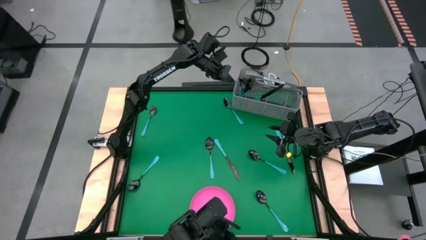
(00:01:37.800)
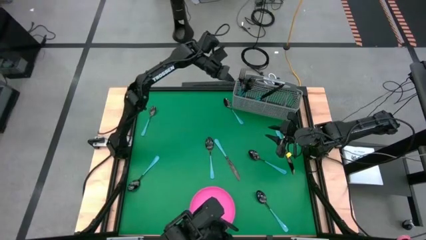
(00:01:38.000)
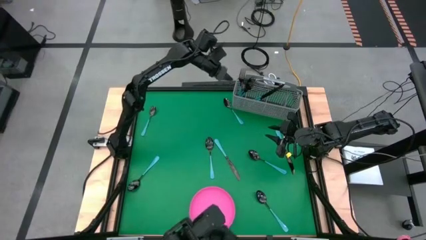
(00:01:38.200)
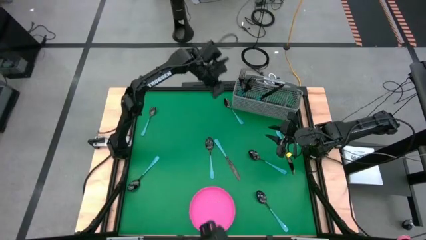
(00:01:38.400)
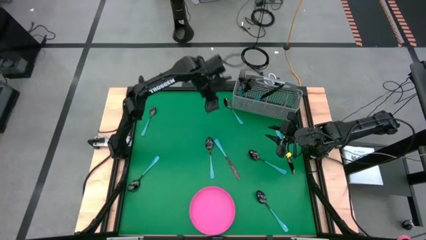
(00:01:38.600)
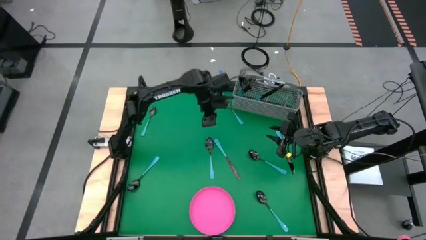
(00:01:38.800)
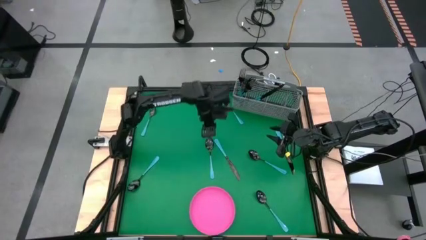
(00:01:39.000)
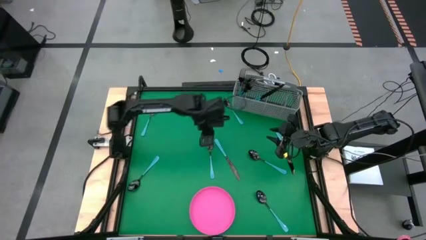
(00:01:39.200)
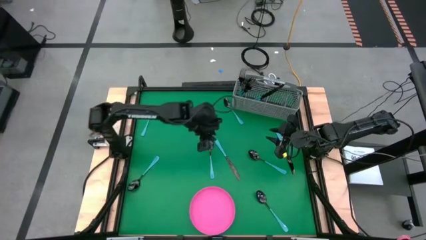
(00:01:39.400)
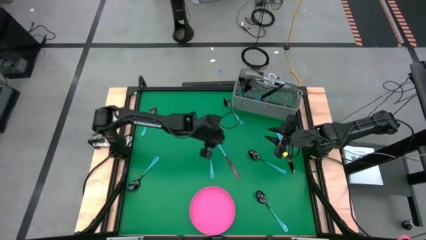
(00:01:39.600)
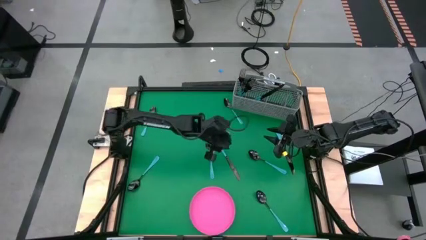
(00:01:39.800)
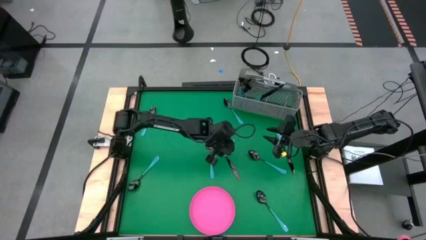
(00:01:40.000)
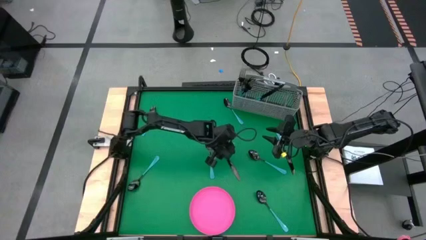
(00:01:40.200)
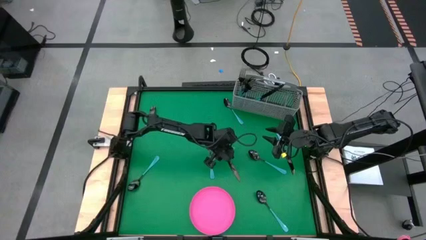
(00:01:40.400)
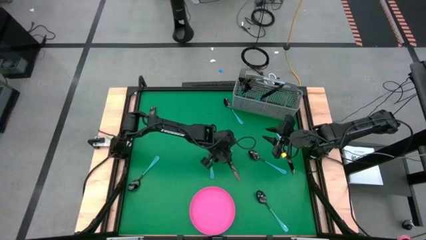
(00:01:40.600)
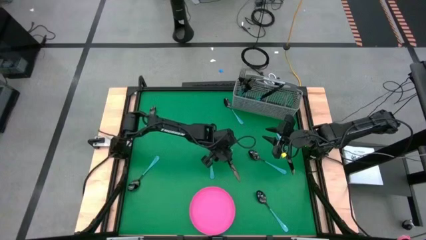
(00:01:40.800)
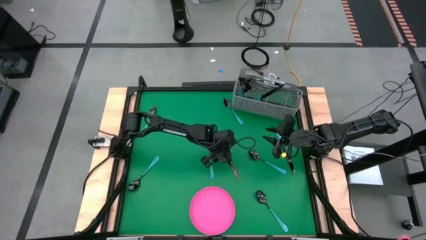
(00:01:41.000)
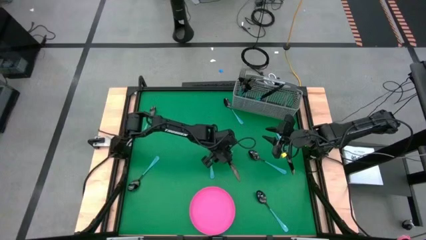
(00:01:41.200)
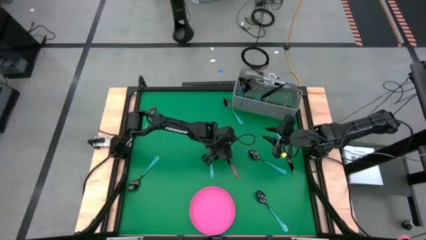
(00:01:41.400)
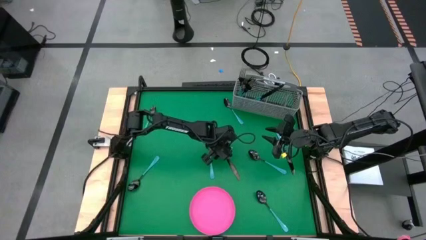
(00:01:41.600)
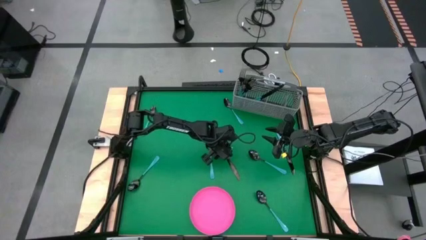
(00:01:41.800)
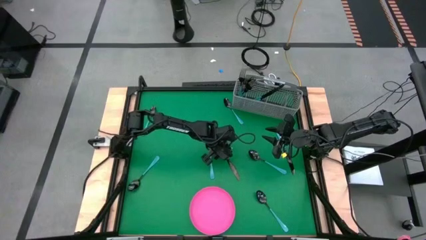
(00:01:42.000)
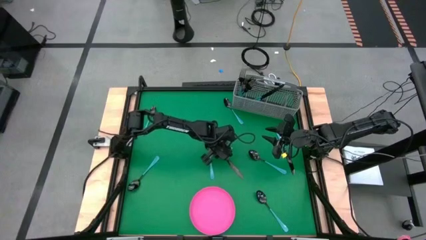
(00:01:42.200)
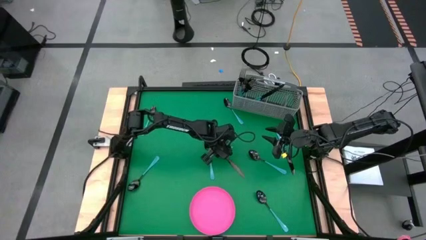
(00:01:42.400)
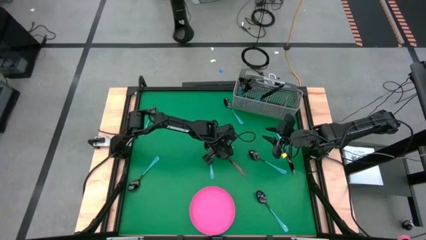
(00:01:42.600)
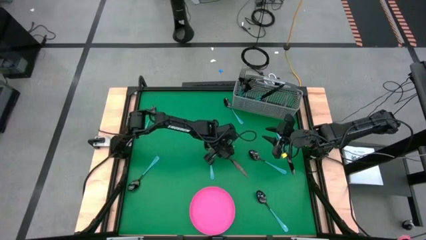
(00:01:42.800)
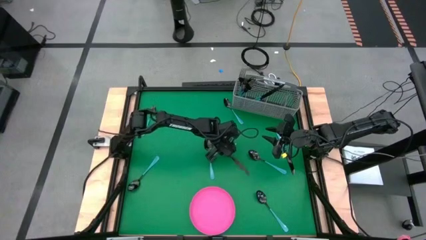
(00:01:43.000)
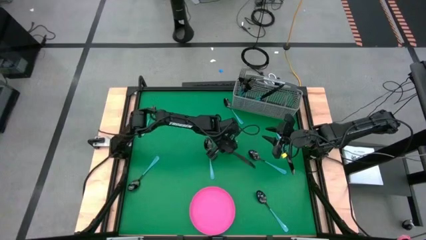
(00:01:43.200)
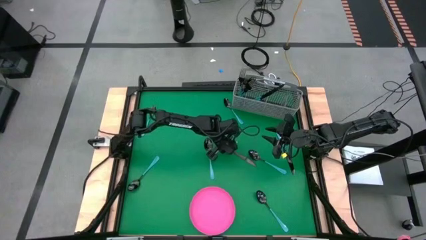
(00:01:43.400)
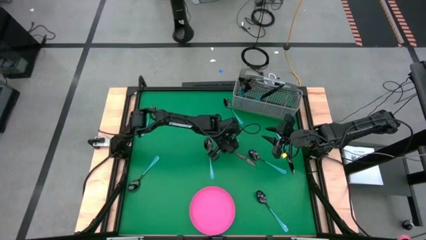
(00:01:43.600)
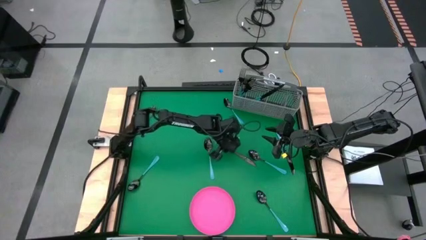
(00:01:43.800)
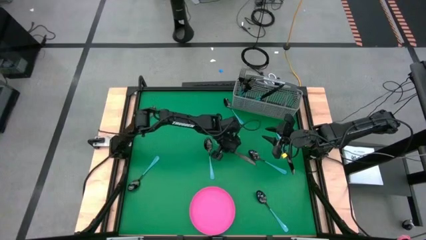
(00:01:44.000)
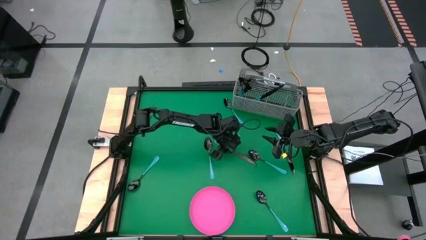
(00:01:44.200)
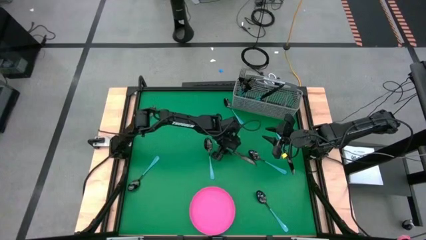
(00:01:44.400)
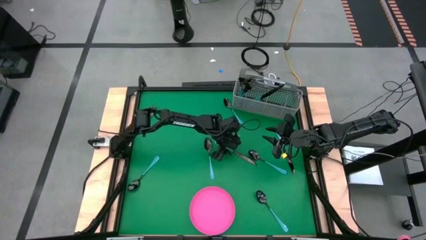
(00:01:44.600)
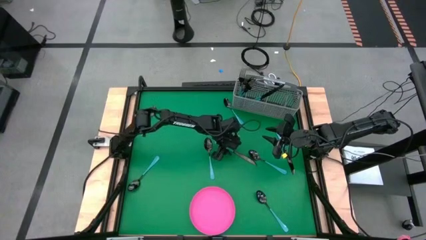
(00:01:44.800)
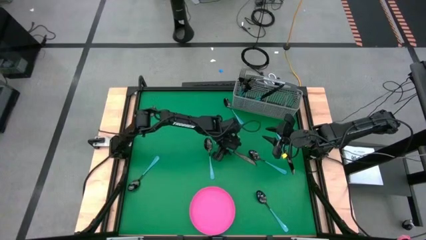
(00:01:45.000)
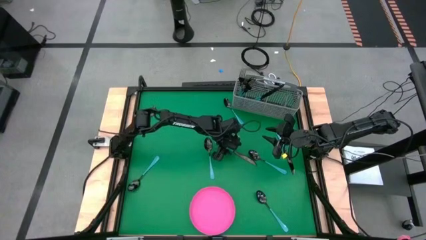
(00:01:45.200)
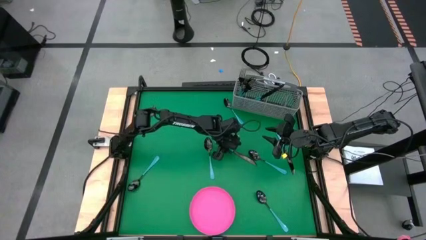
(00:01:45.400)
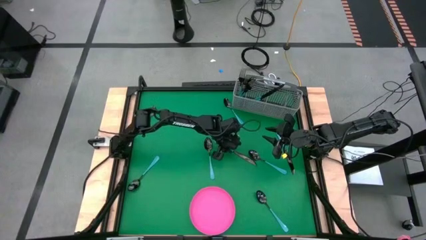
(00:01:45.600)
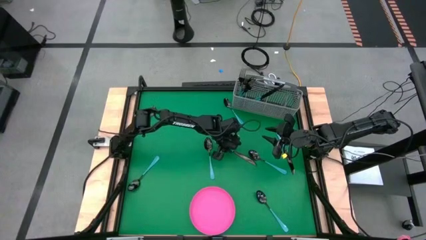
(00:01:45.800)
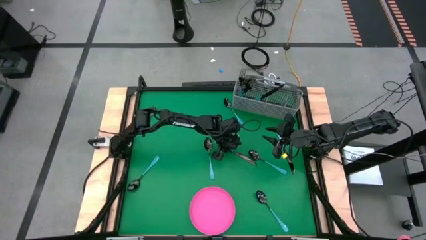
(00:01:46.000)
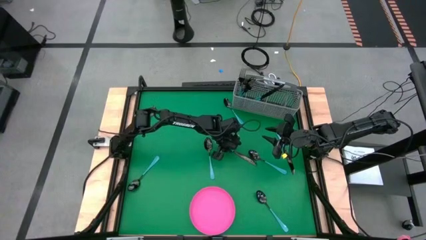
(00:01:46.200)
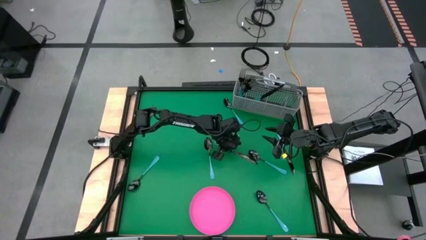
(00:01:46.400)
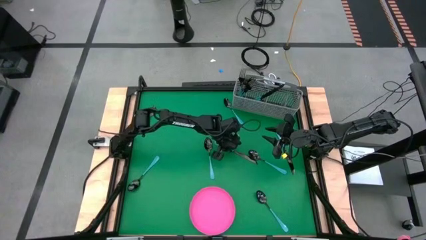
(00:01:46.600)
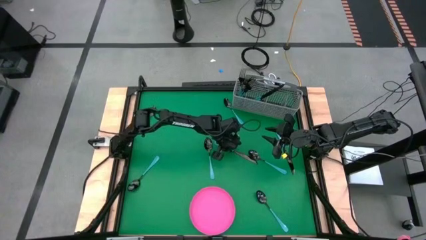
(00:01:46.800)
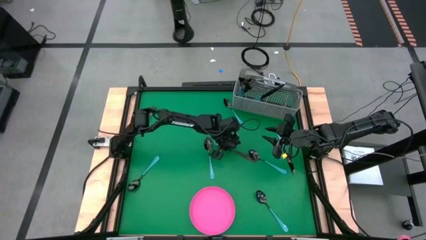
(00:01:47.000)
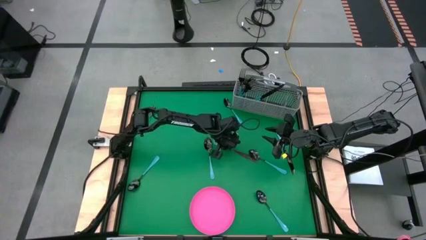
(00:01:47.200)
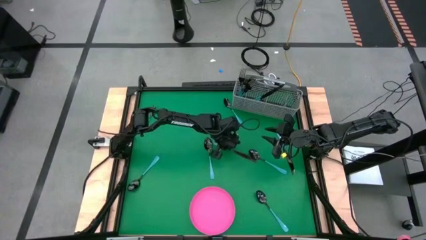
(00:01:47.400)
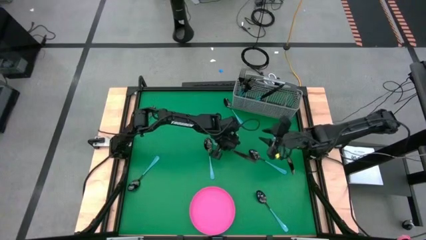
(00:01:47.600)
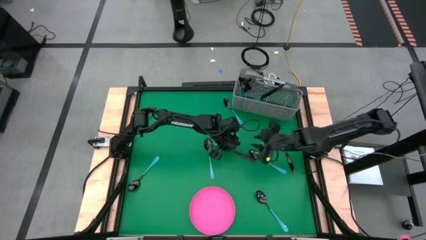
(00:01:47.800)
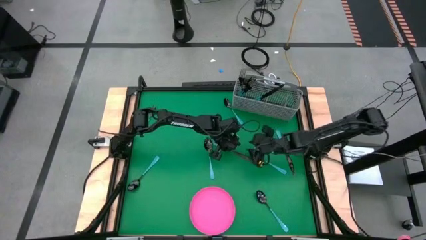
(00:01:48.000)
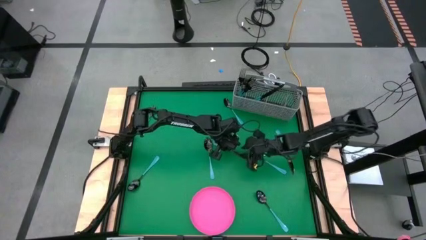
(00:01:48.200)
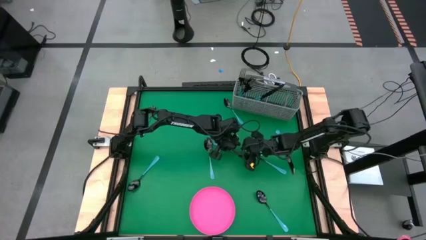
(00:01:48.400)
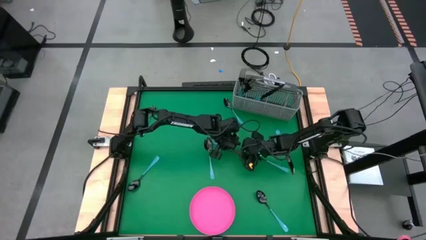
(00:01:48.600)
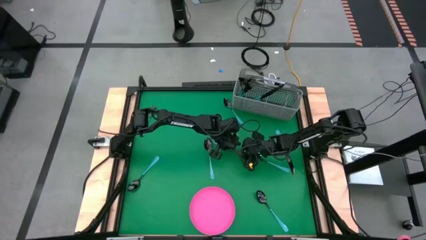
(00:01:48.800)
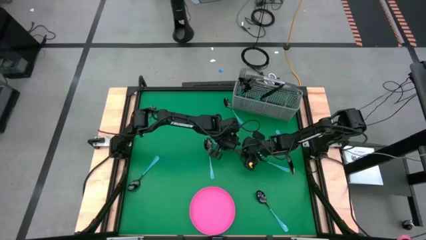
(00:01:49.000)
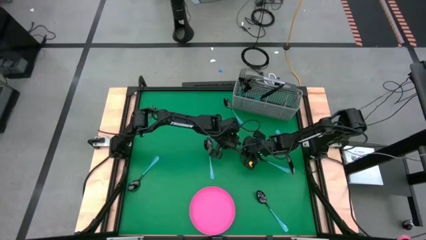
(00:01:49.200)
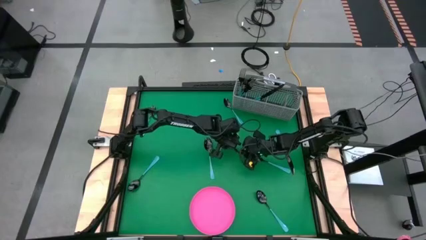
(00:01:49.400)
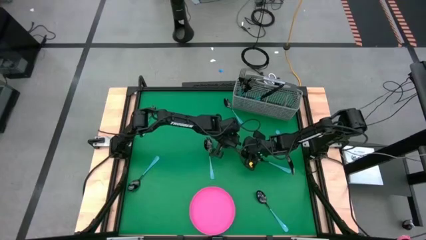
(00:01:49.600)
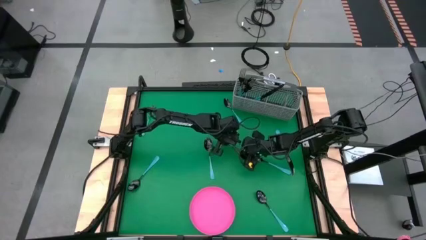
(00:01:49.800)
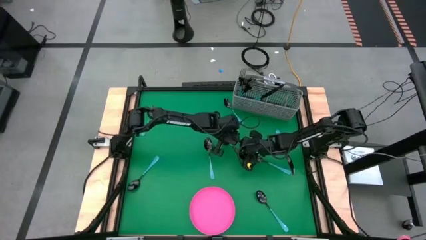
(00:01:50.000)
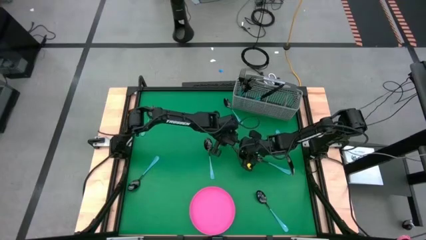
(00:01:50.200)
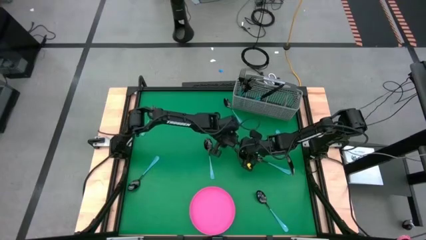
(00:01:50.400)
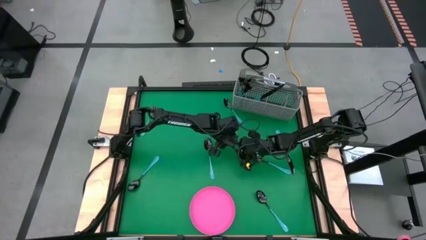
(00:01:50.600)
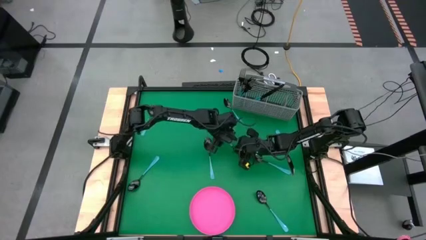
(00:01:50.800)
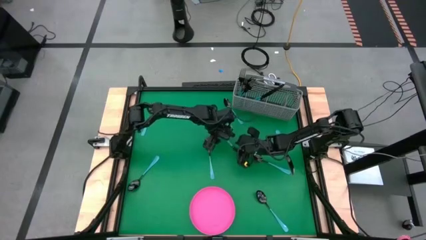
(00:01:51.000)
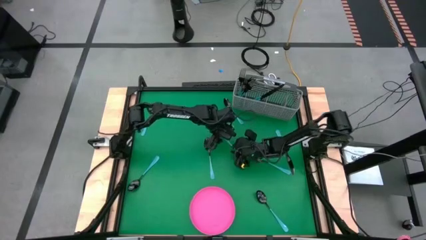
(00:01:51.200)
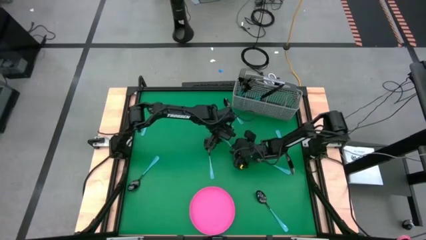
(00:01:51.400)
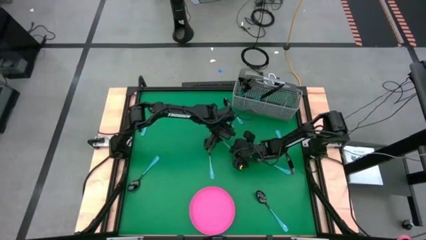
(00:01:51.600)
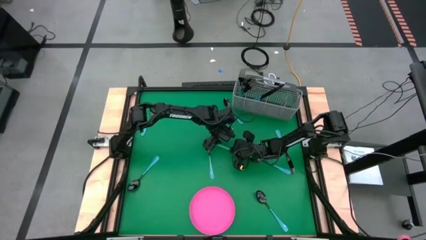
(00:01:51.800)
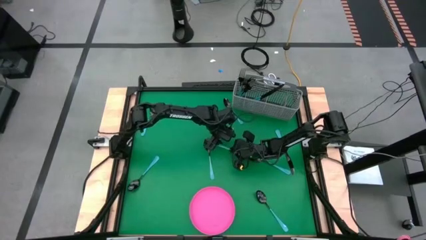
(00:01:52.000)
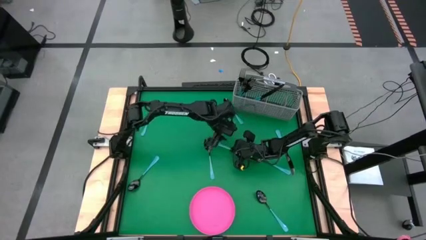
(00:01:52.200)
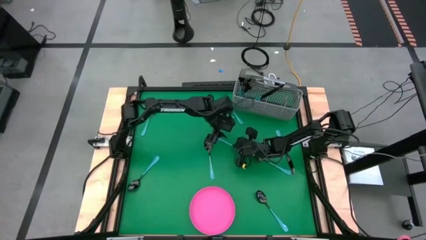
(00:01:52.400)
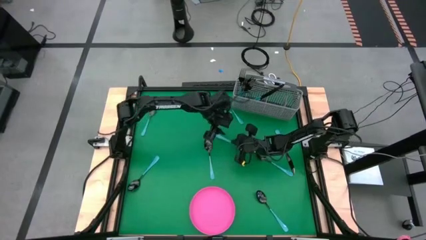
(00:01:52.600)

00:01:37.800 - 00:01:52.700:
Task: Sort silverware
Put the blue knife into the utensil holder
